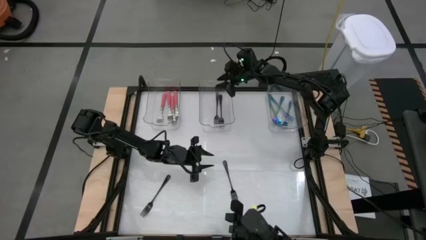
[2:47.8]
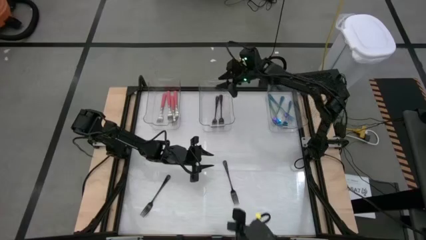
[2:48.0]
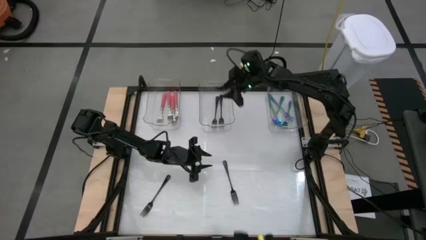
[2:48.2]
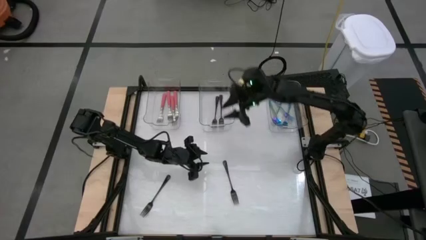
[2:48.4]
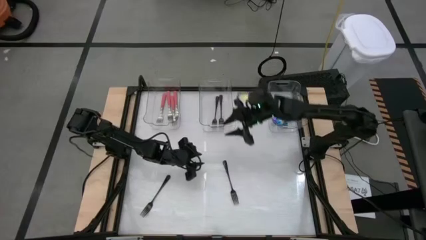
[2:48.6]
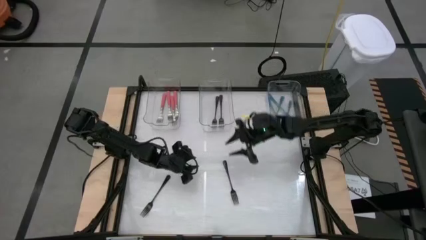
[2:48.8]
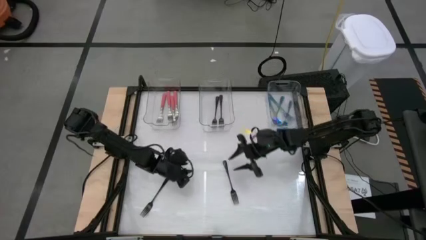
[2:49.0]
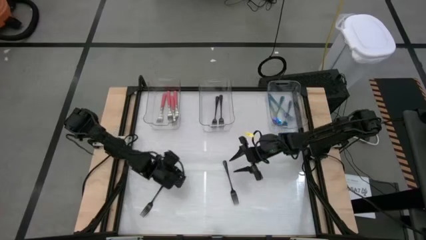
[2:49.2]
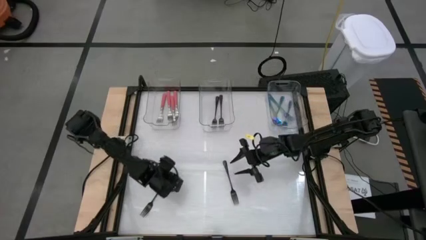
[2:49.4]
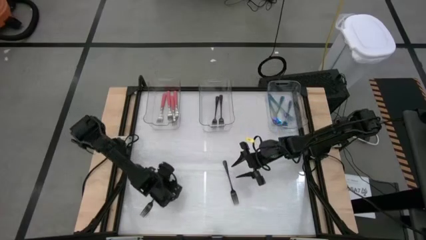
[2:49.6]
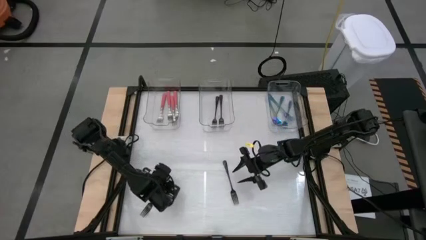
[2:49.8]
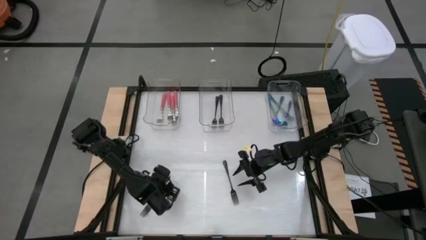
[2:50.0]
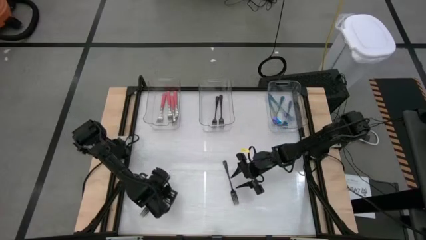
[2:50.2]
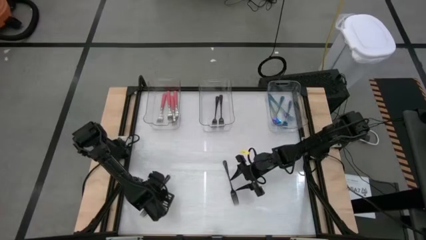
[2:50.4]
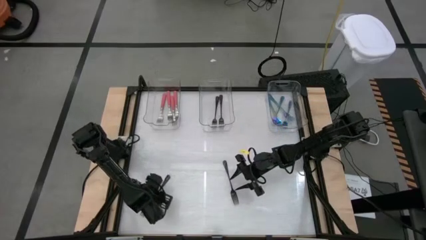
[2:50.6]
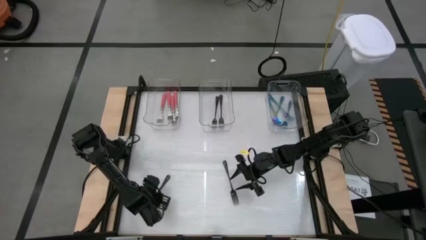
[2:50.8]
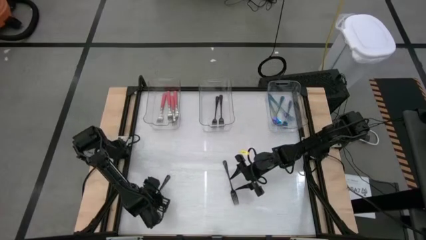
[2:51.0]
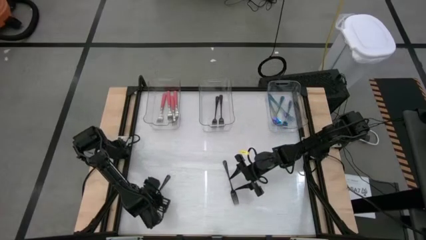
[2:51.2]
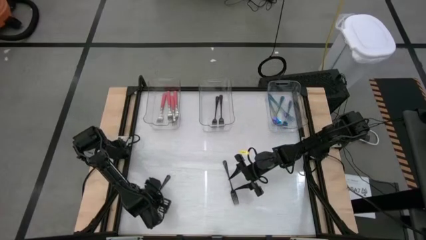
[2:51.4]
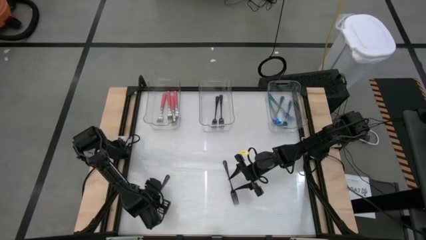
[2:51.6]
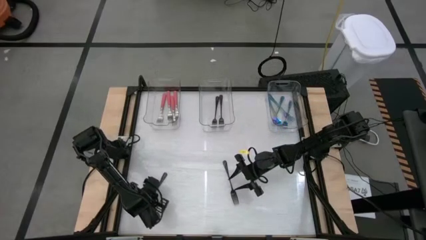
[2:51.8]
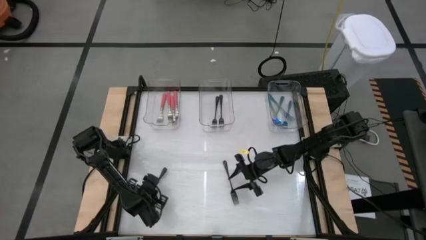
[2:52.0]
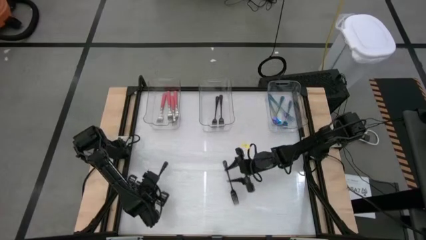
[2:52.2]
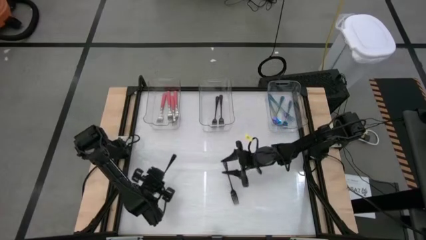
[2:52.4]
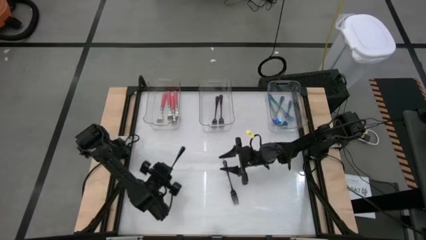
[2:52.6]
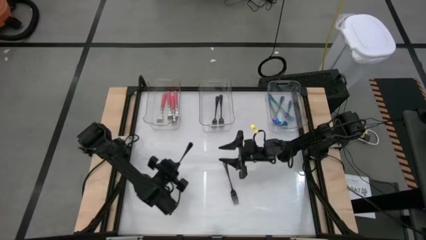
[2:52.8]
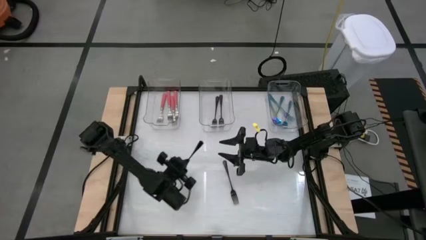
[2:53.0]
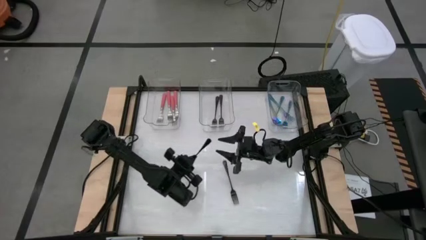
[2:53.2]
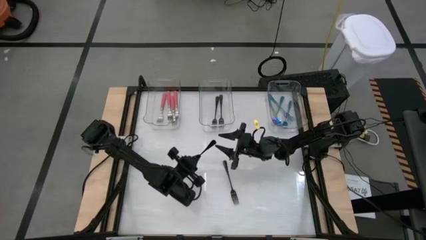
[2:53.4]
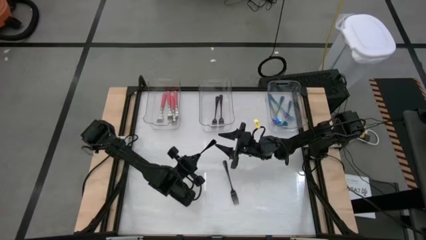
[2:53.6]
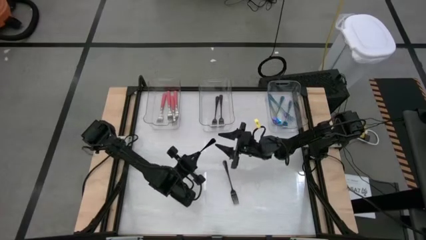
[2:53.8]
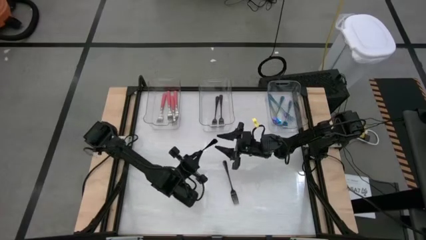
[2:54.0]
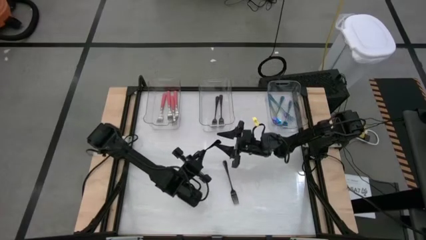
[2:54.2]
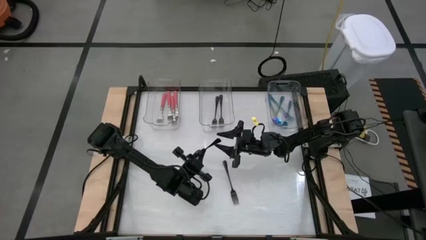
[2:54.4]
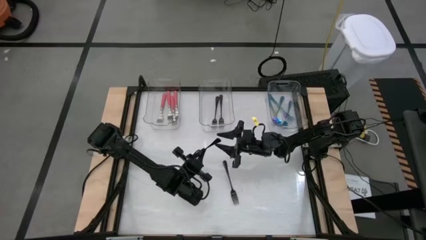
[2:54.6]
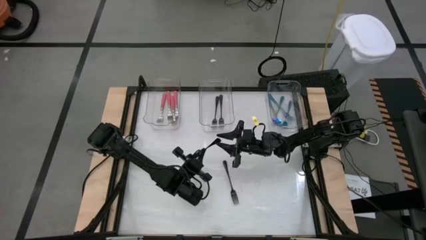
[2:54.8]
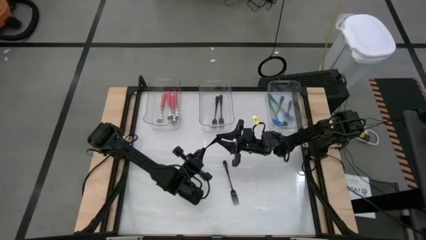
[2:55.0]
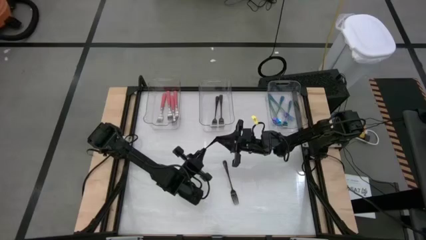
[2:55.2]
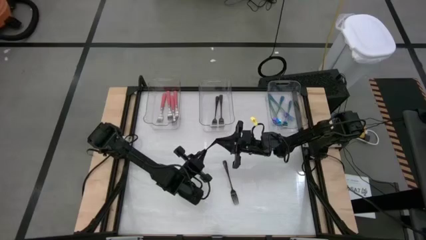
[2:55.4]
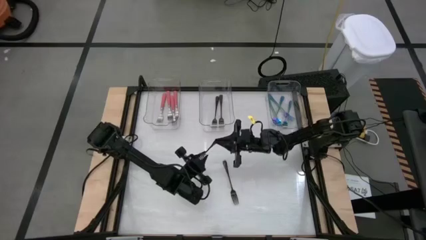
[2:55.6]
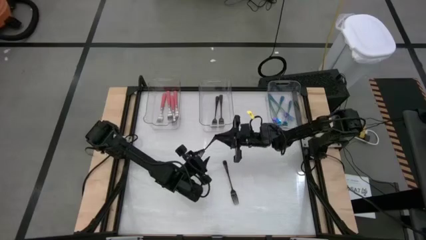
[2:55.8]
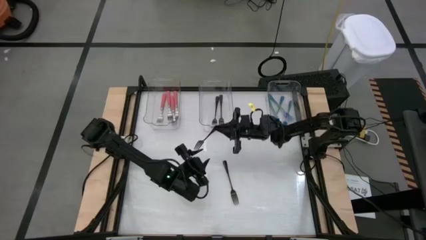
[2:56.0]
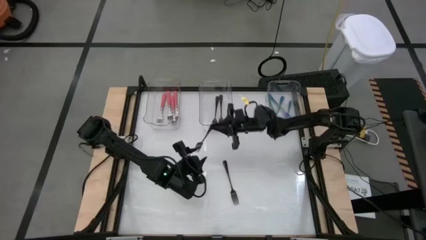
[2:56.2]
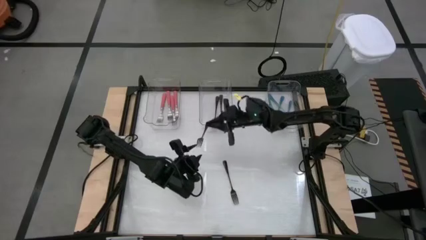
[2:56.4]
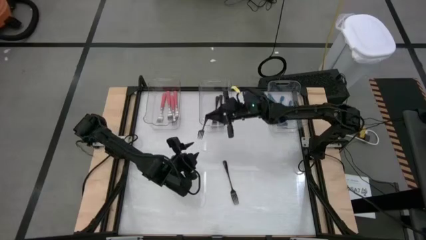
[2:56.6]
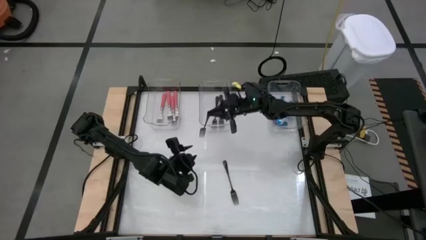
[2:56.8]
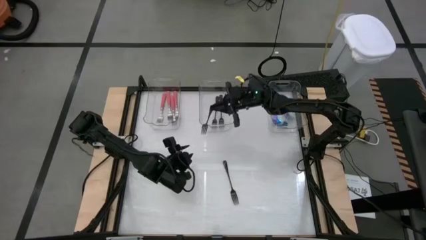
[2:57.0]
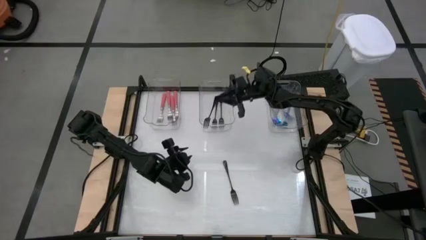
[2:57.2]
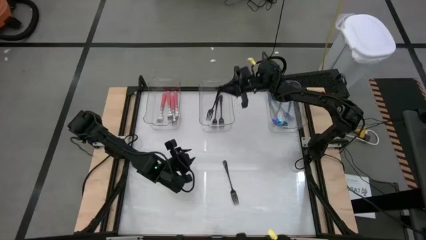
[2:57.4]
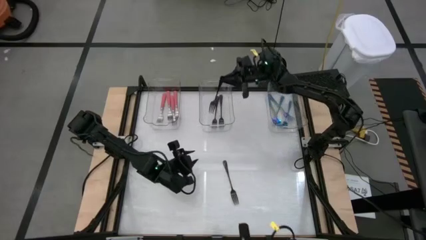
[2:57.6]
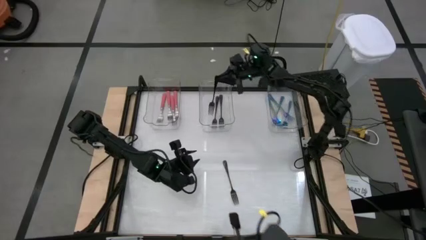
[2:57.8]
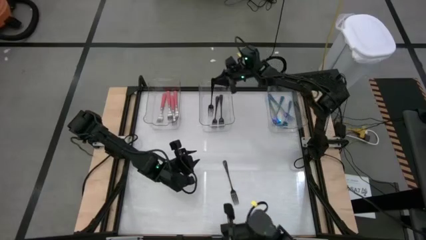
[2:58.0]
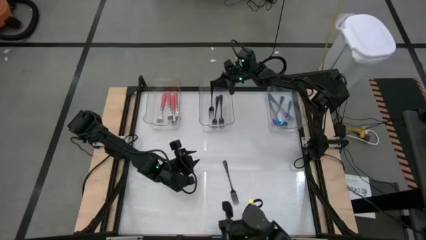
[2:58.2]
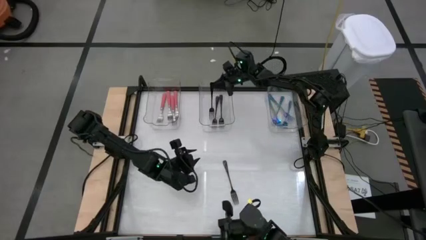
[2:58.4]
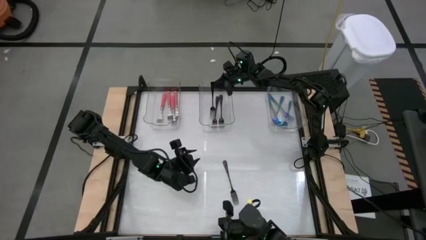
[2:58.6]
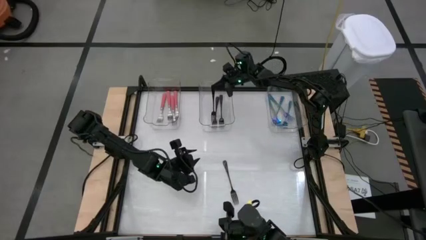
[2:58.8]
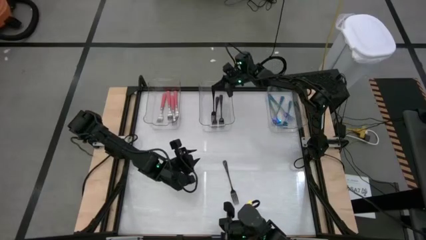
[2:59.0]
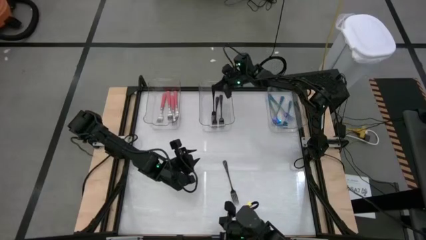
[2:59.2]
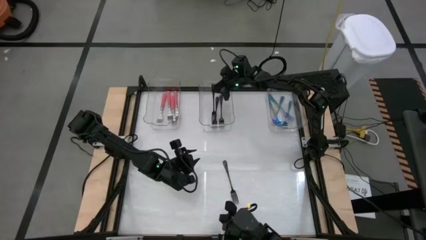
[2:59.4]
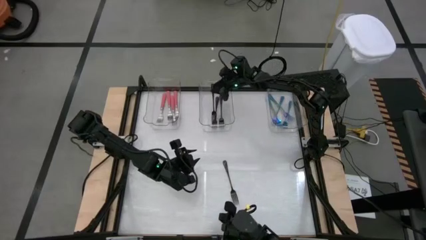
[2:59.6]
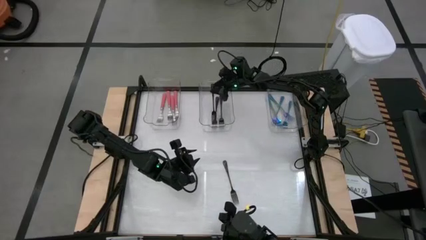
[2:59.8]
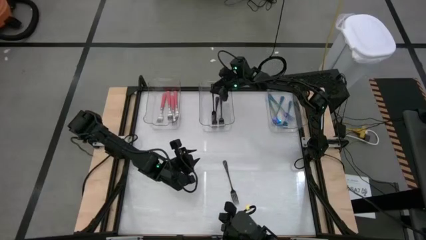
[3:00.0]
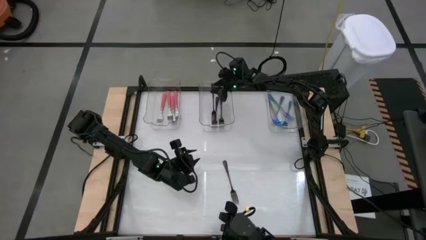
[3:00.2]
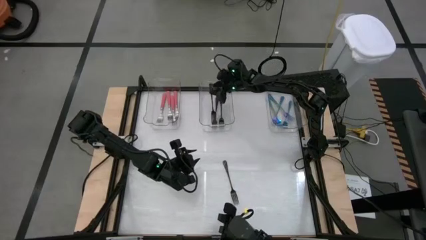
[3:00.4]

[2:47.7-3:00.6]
Task: Sort silverware by color (type)
Put the black fork into the middle transparent bin
